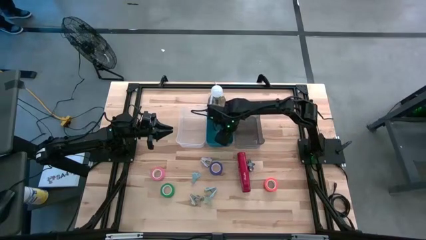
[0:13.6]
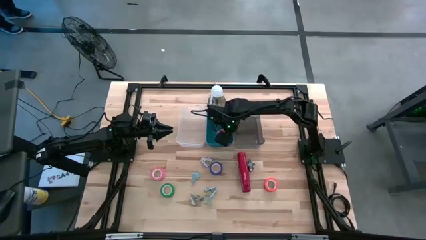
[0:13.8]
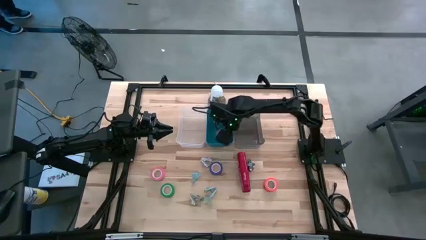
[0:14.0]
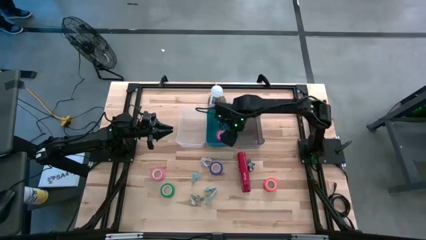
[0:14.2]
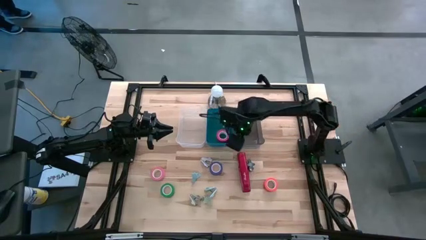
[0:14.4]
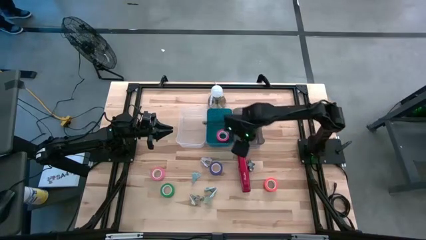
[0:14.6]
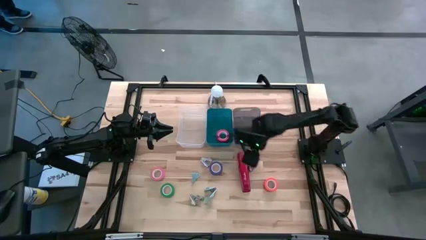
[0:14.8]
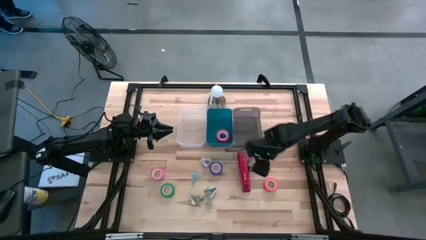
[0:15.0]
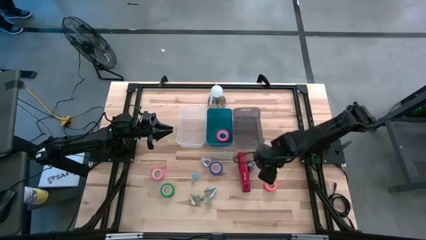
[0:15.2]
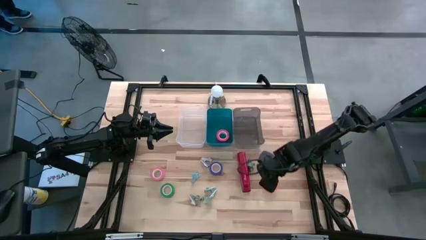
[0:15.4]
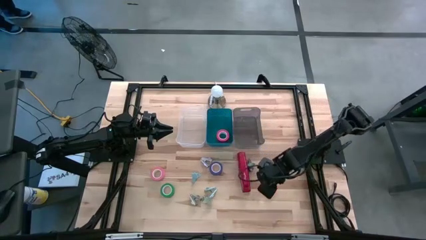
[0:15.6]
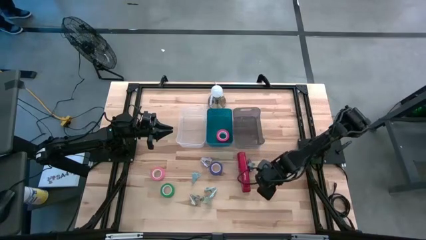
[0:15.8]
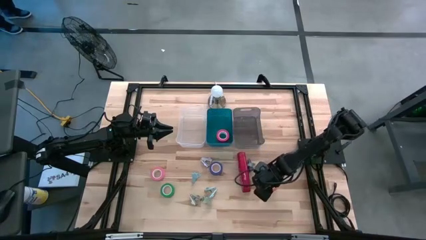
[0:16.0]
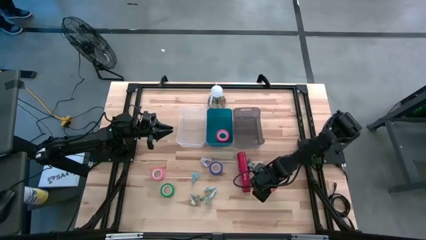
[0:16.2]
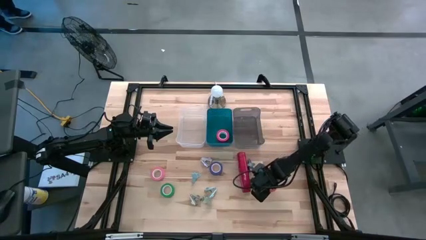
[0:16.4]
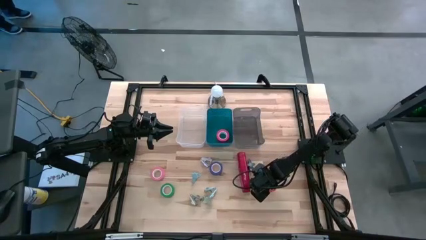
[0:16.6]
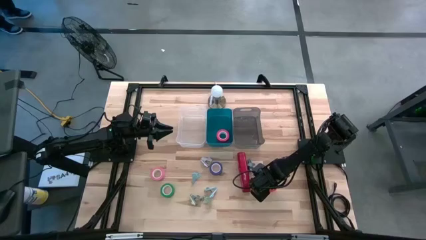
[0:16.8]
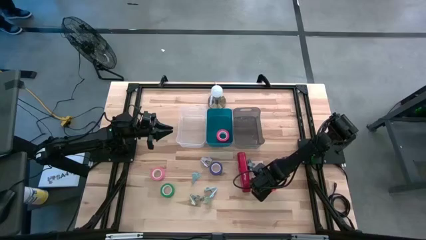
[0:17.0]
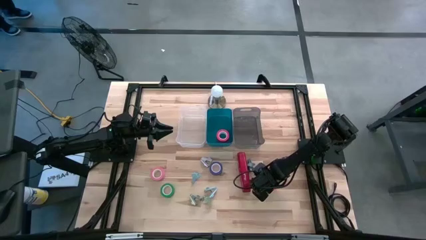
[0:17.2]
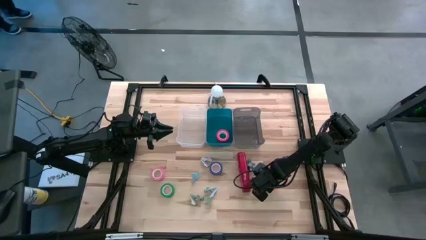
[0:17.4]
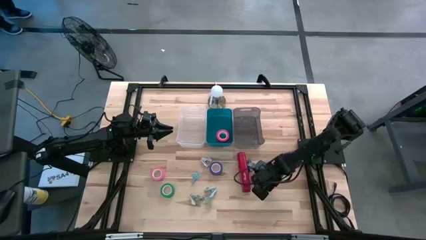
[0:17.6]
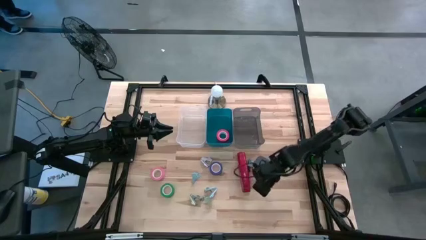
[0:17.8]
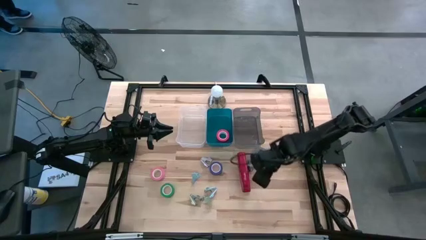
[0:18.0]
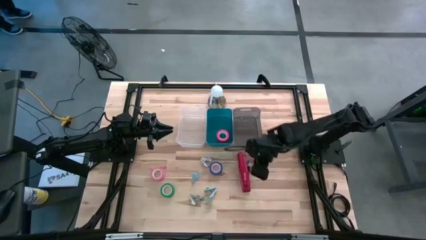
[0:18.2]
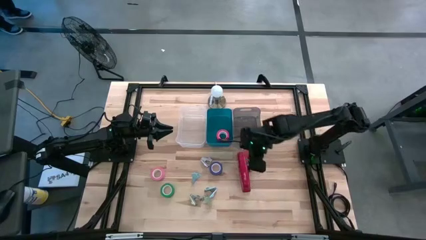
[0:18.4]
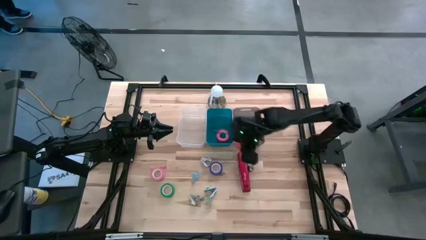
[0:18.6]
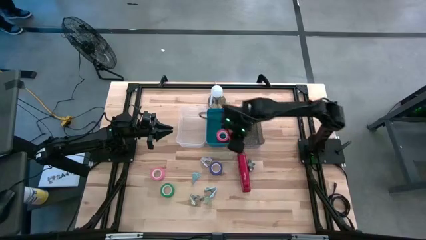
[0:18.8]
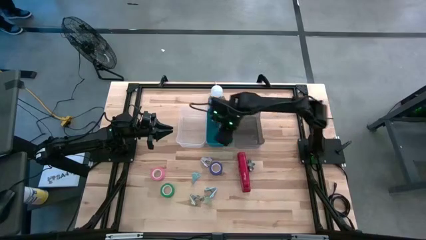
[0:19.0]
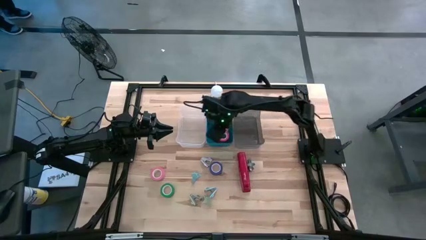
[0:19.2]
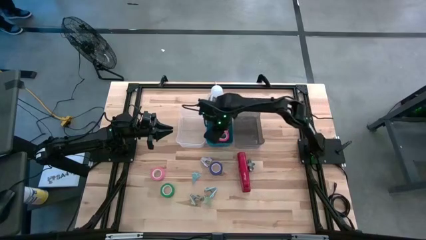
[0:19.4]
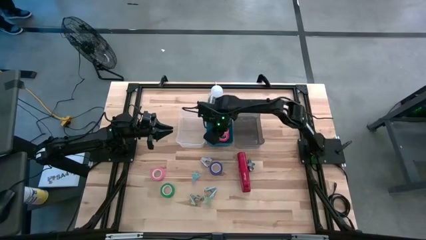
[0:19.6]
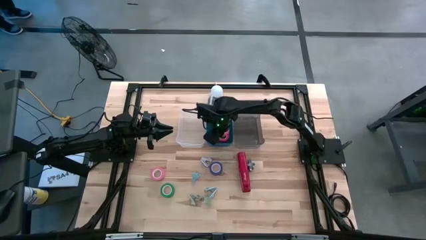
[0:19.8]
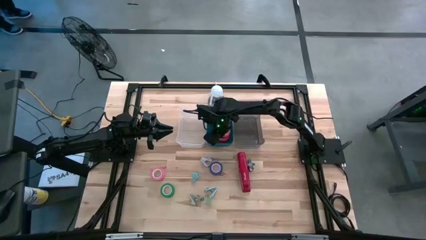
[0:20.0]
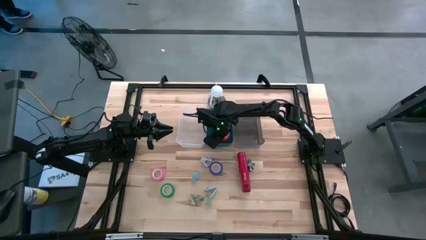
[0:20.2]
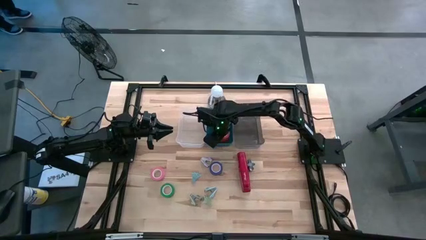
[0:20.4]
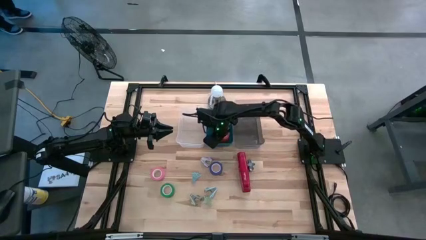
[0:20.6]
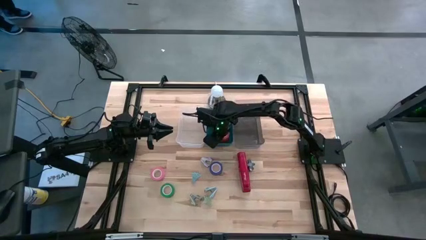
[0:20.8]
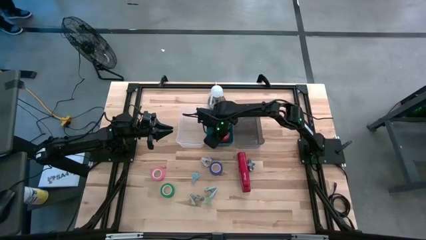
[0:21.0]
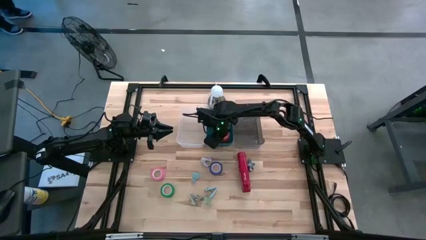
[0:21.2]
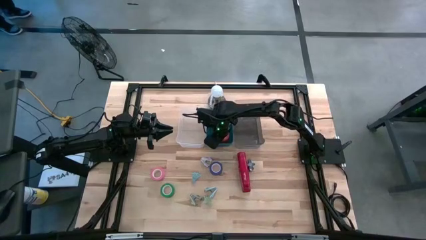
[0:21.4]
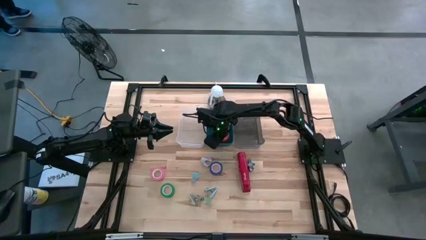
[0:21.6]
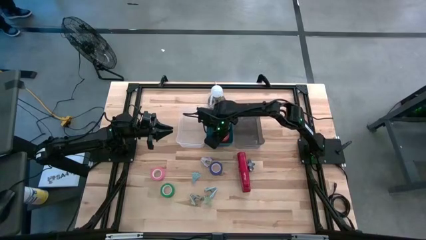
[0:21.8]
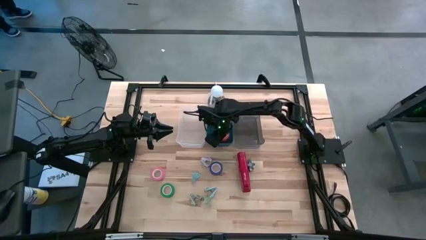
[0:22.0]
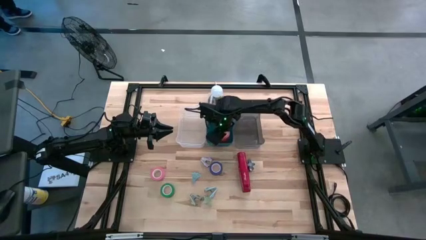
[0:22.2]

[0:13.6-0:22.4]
Task: Pick and place Stapler, Stapler remover, tape
Put the orange tape into the blue bin

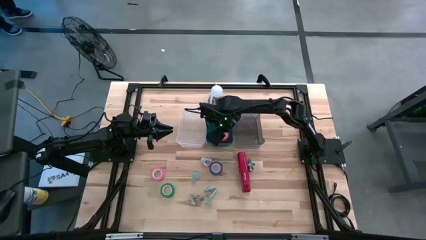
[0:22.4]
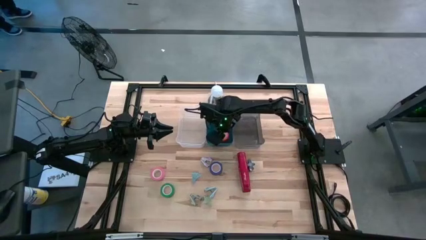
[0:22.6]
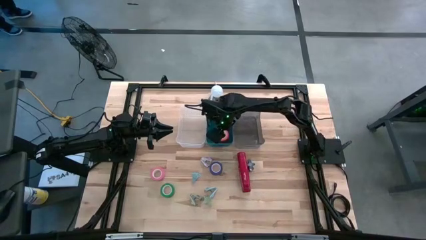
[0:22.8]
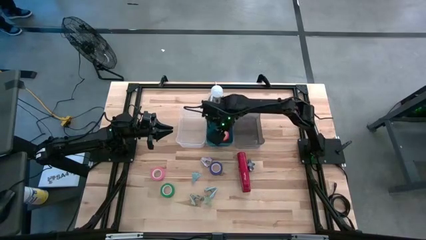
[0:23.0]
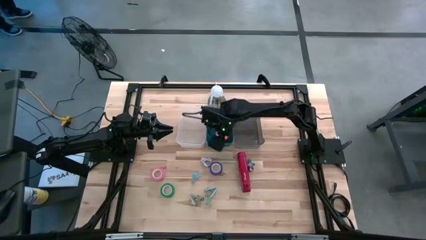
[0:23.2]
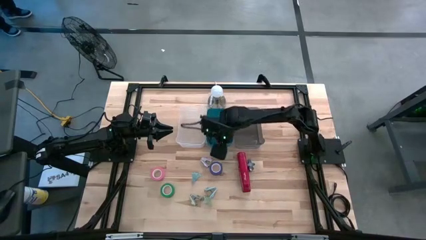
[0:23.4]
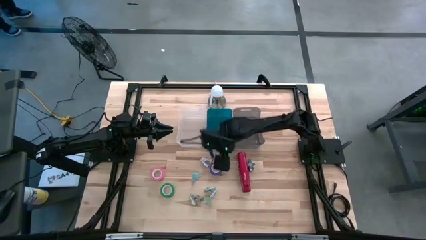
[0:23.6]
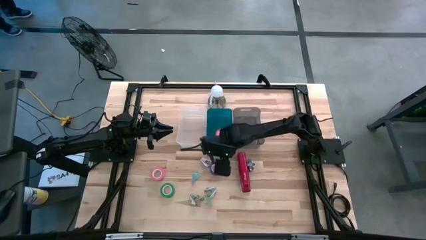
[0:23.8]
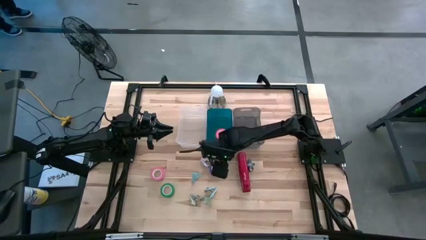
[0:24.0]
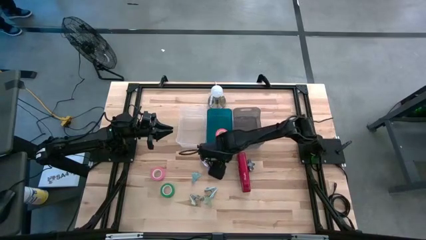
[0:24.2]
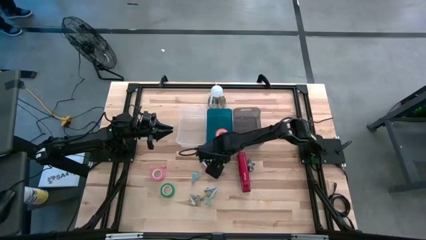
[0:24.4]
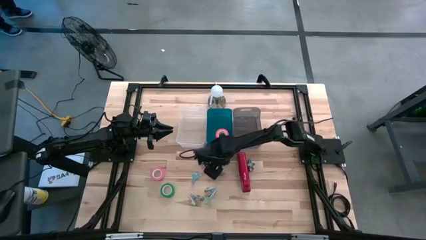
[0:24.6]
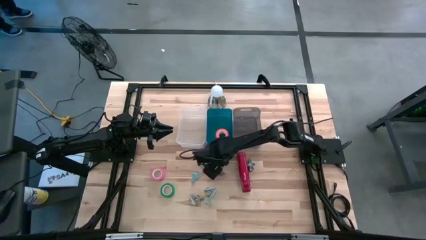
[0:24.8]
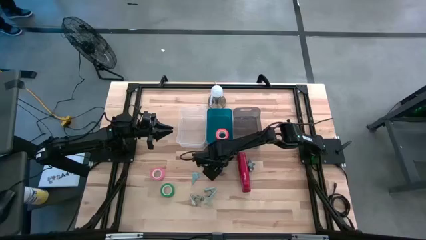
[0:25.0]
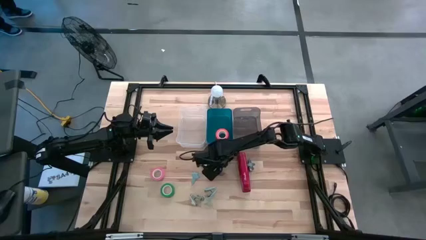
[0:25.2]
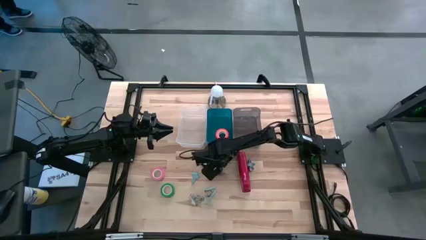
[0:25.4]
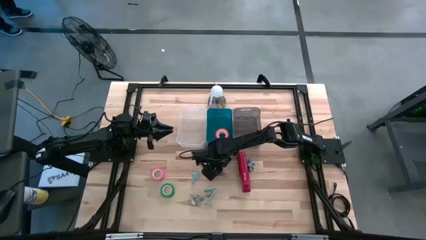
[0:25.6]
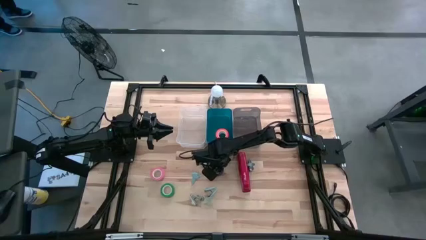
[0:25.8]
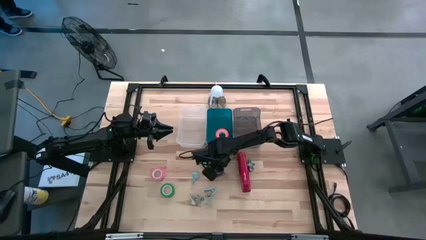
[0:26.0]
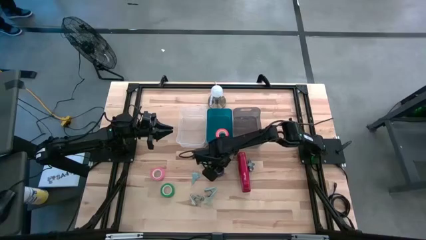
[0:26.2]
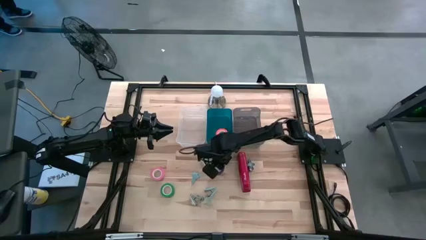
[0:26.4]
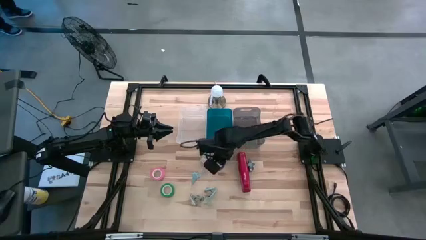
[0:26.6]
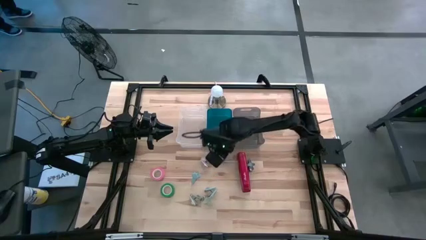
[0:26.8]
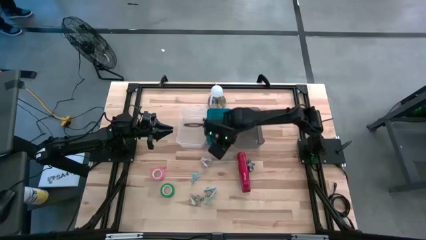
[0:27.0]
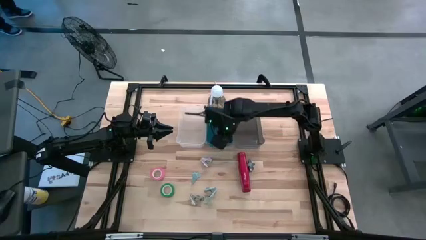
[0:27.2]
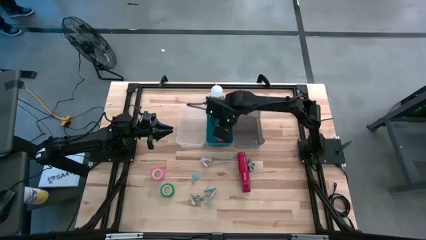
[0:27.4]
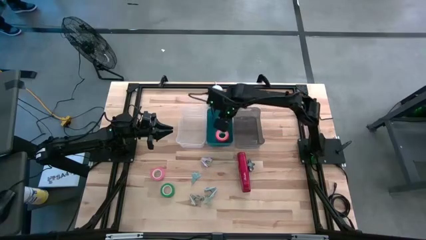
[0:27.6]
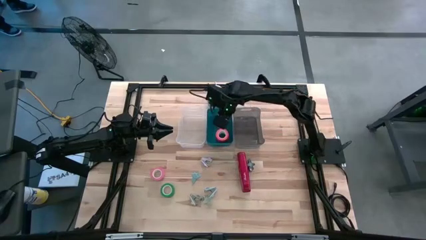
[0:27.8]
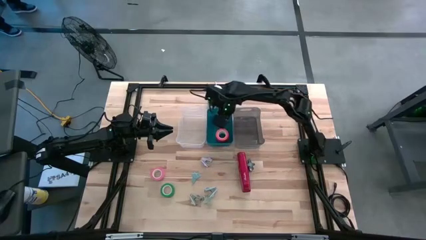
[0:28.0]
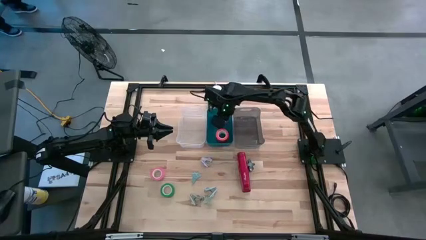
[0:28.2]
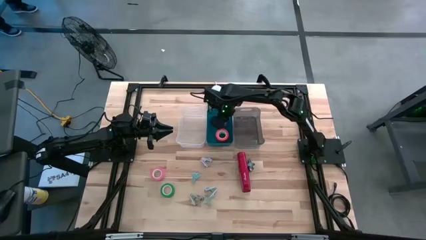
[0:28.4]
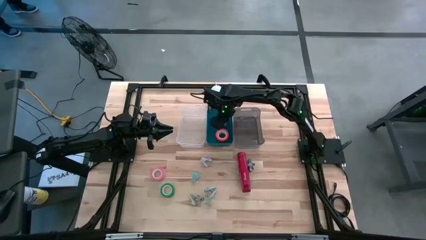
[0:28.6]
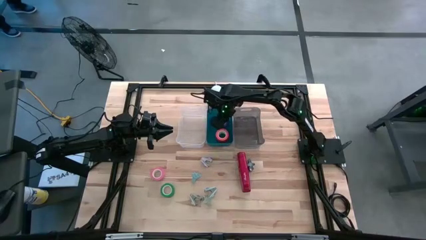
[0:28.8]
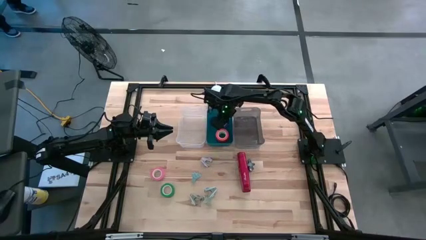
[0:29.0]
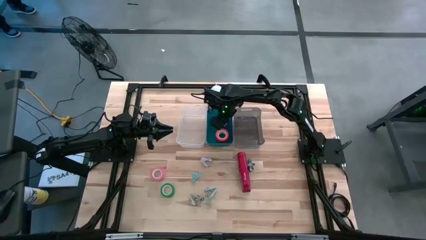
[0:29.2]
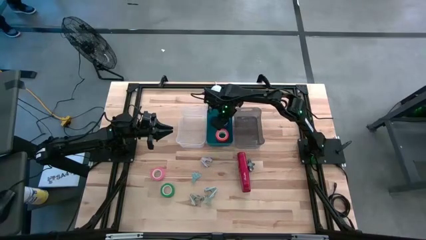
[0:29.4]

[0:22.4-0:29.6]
Put the violet tape into the blue bin
